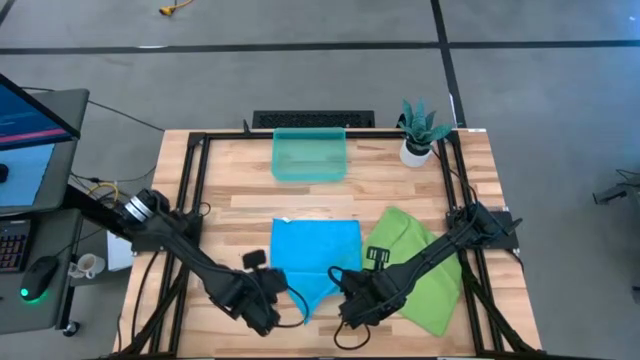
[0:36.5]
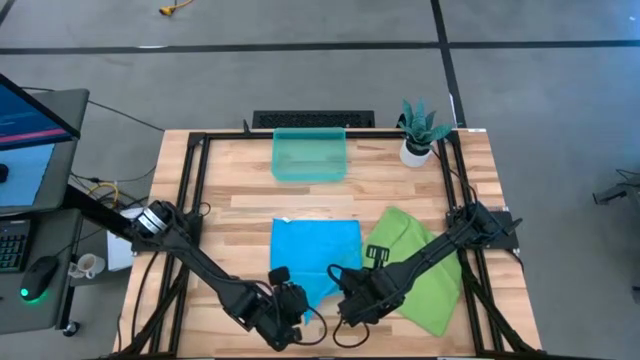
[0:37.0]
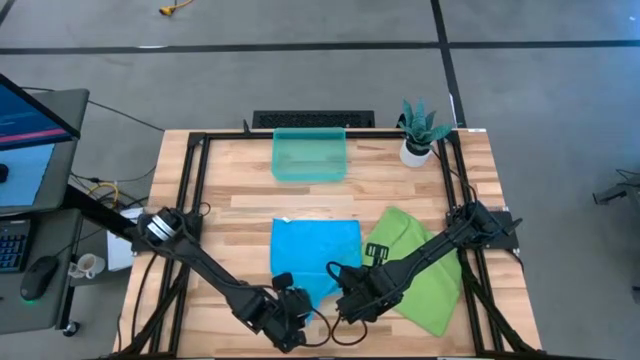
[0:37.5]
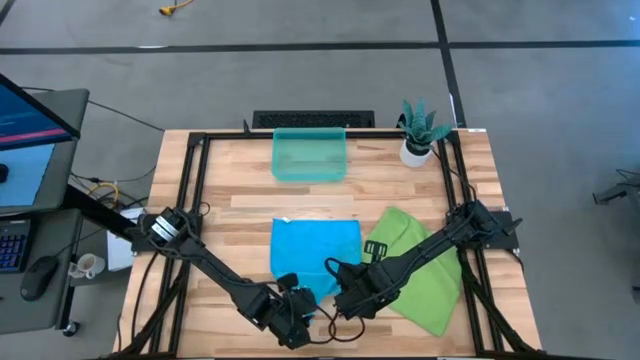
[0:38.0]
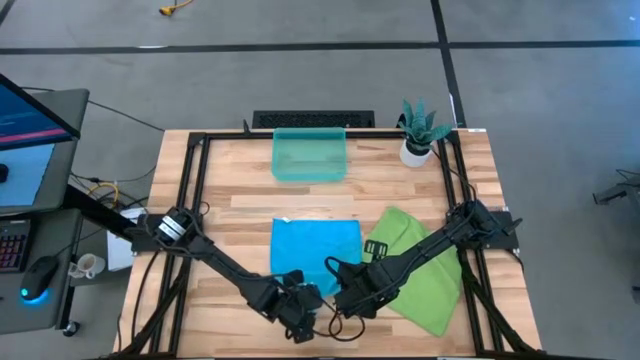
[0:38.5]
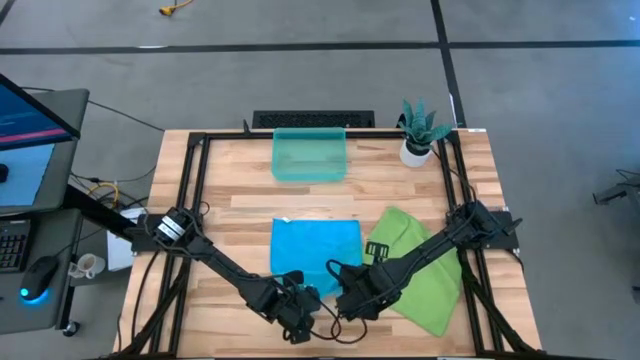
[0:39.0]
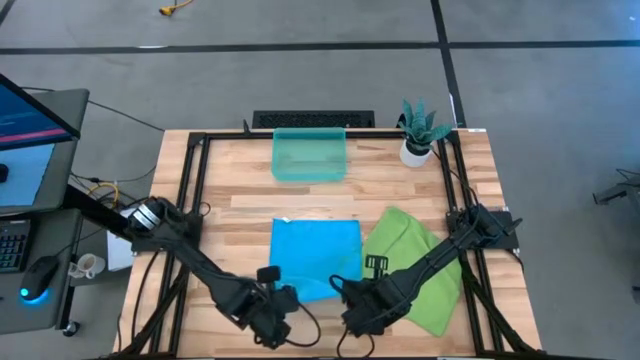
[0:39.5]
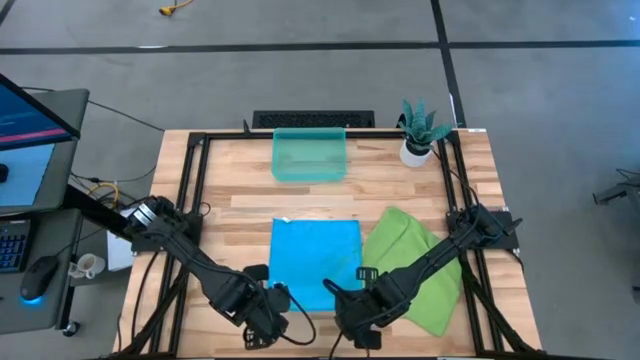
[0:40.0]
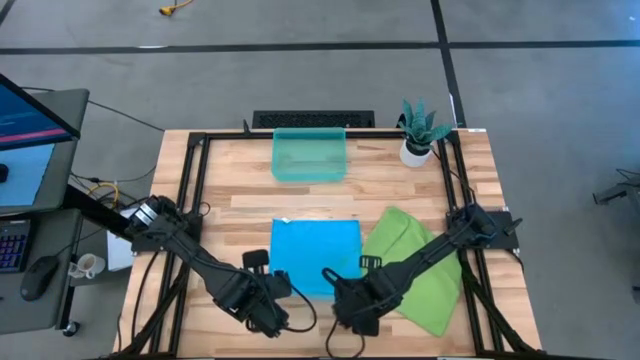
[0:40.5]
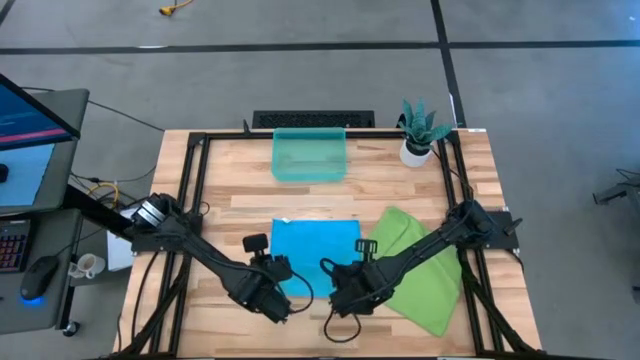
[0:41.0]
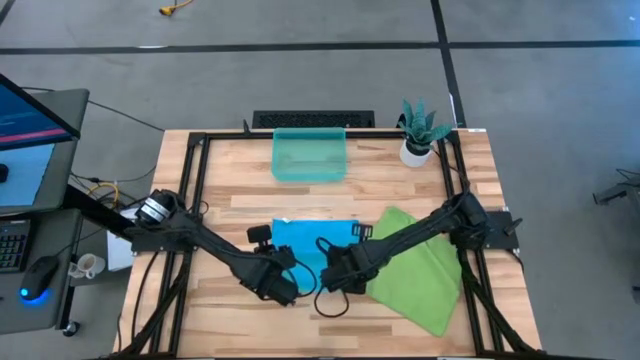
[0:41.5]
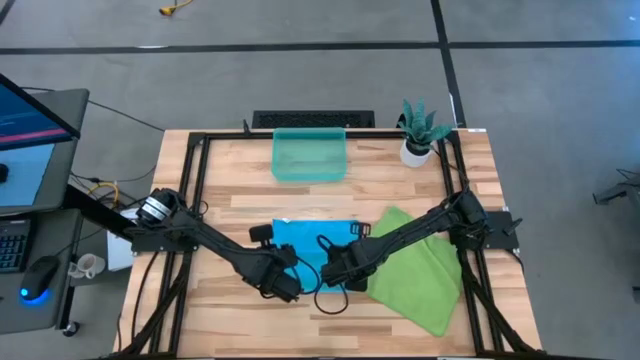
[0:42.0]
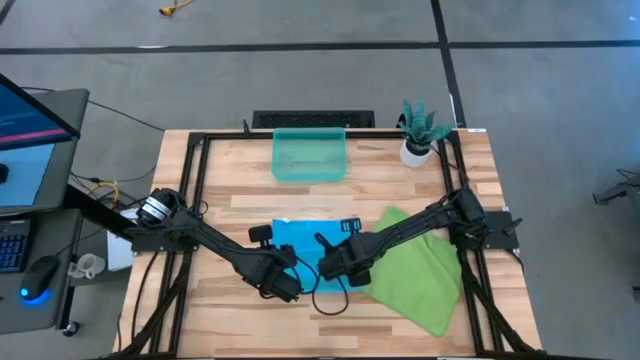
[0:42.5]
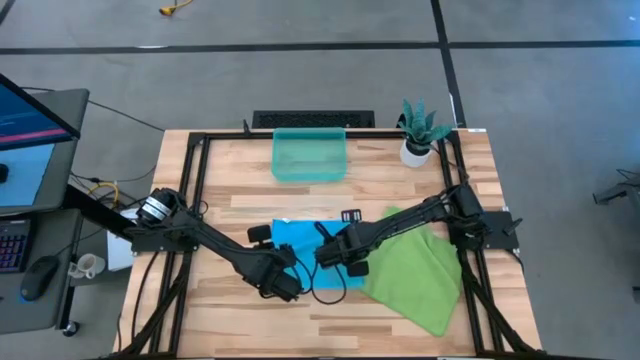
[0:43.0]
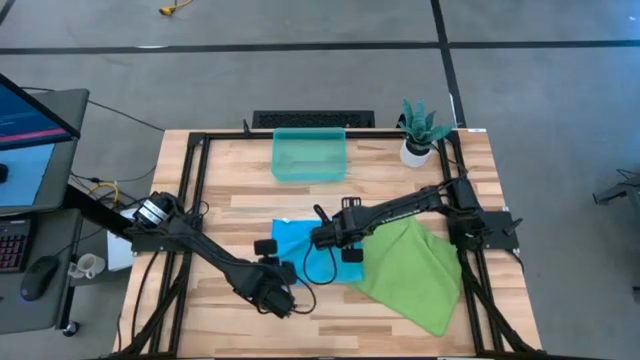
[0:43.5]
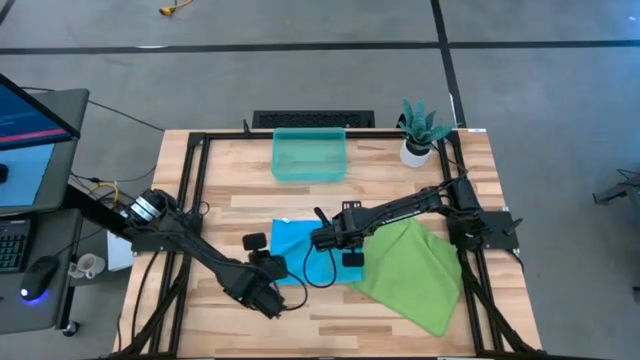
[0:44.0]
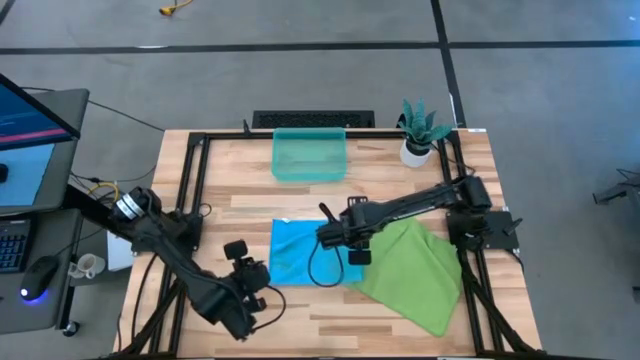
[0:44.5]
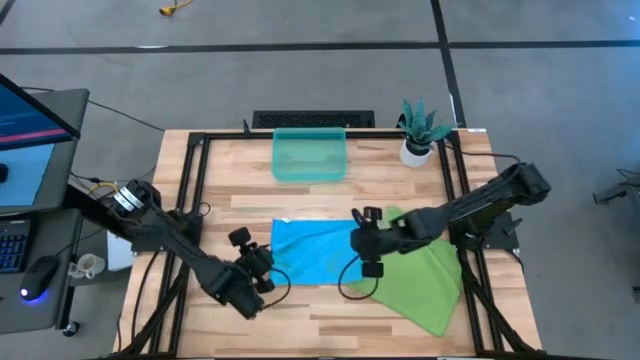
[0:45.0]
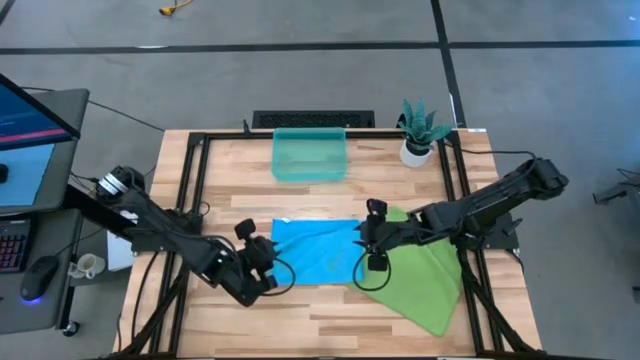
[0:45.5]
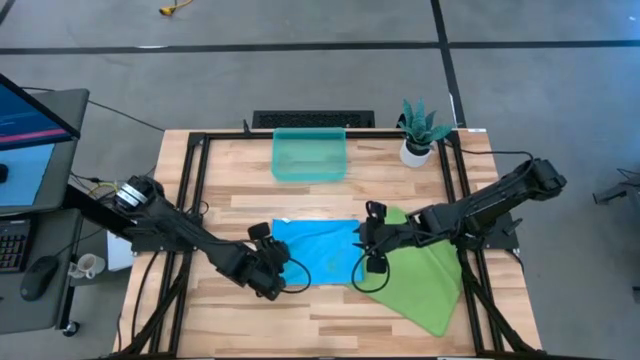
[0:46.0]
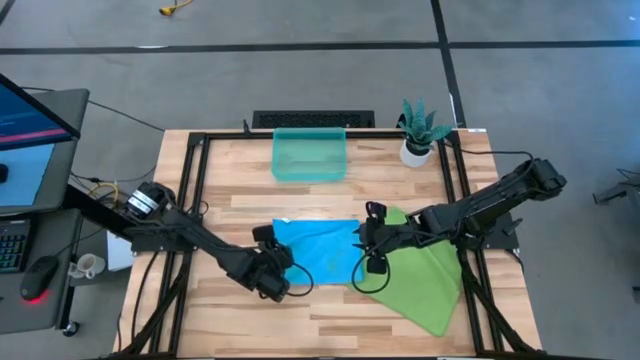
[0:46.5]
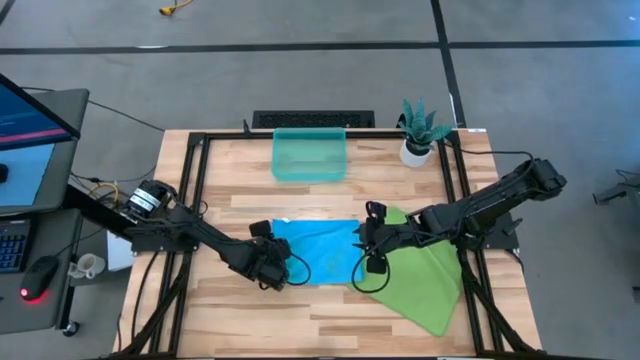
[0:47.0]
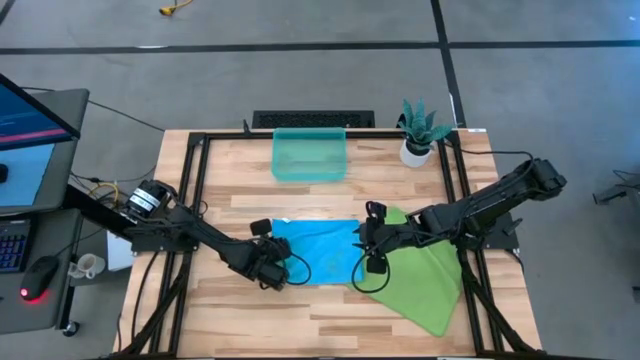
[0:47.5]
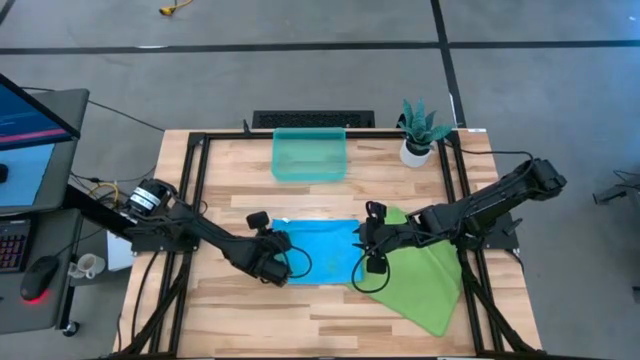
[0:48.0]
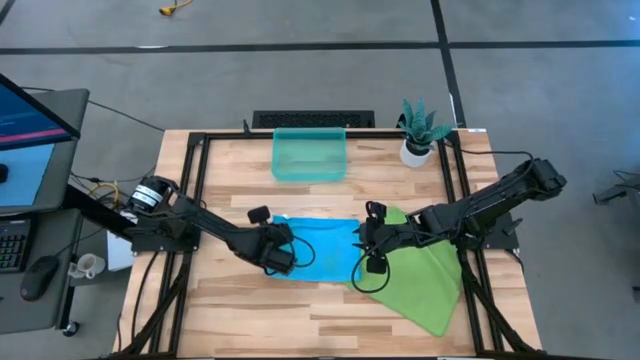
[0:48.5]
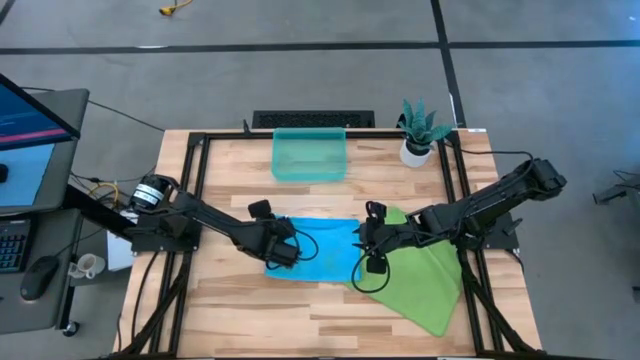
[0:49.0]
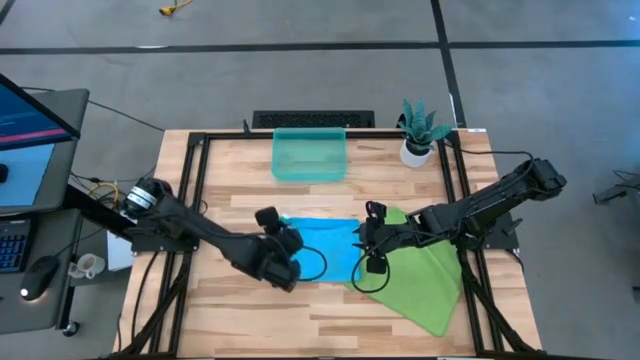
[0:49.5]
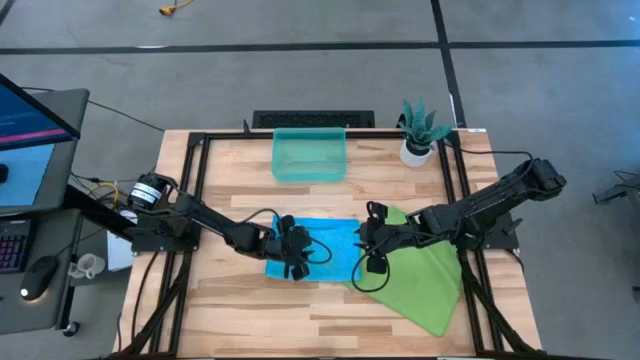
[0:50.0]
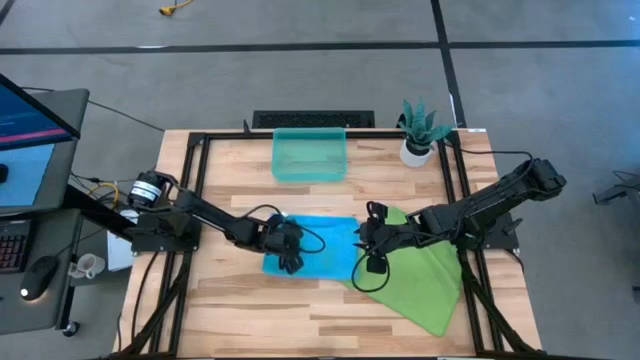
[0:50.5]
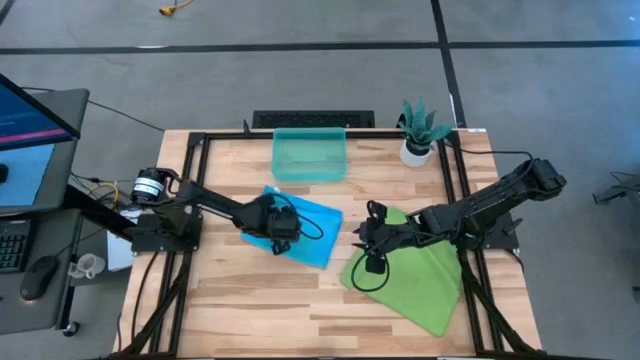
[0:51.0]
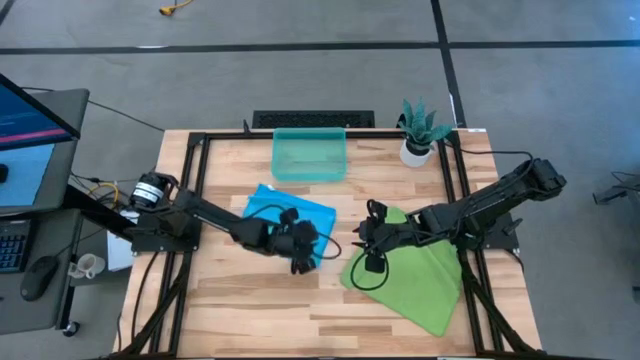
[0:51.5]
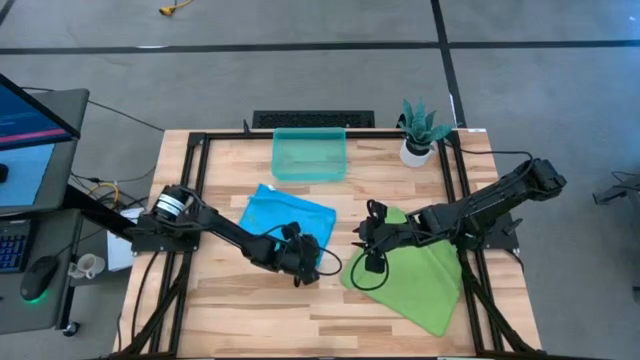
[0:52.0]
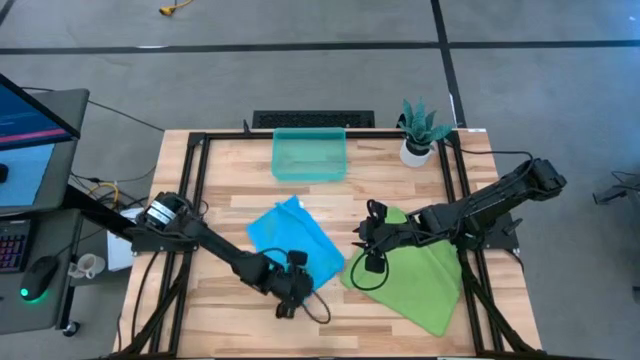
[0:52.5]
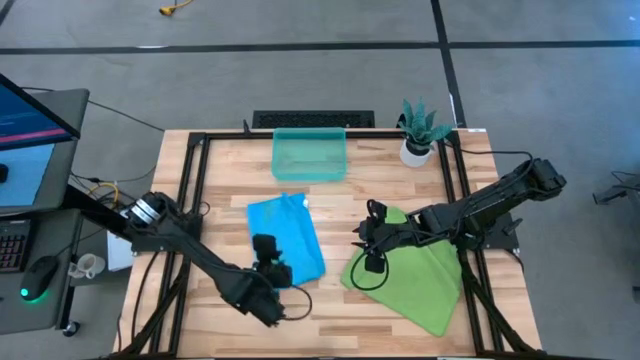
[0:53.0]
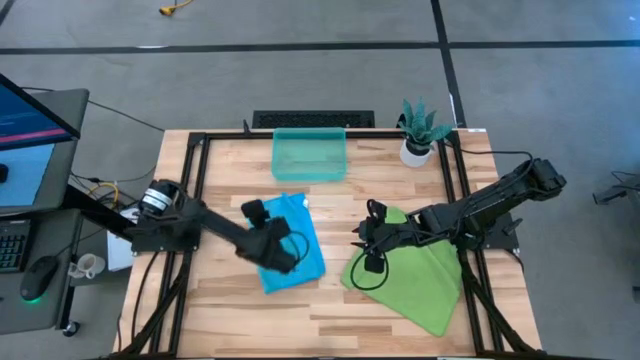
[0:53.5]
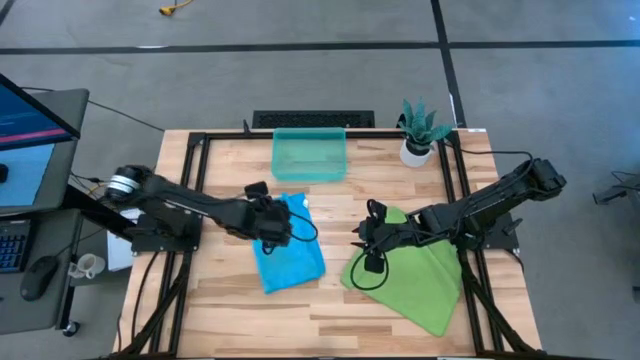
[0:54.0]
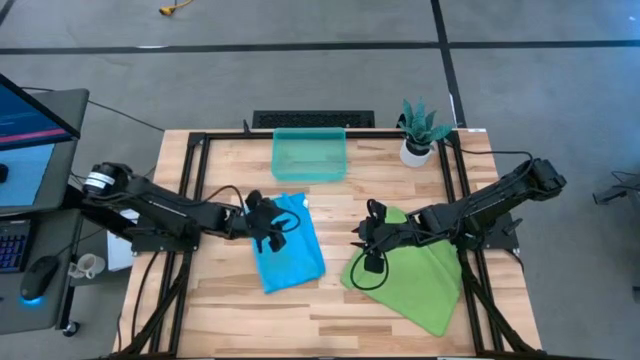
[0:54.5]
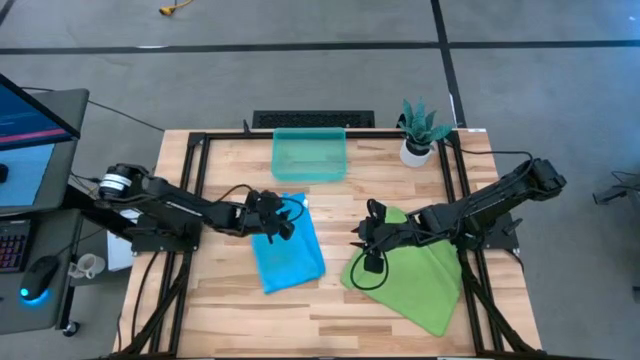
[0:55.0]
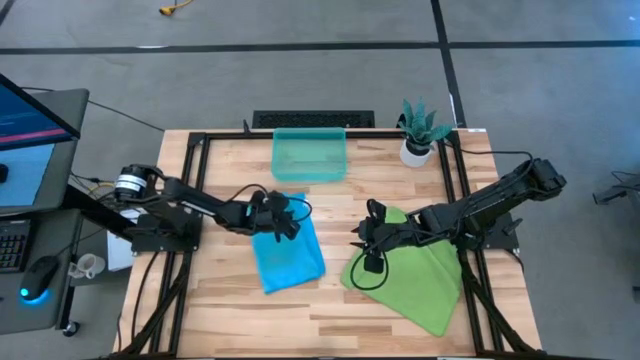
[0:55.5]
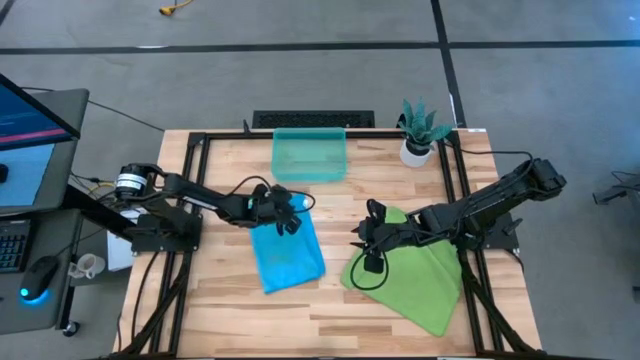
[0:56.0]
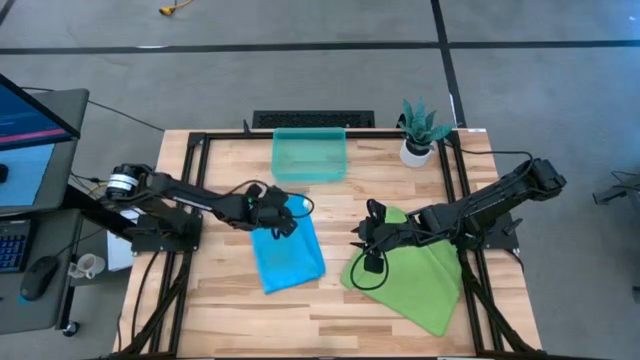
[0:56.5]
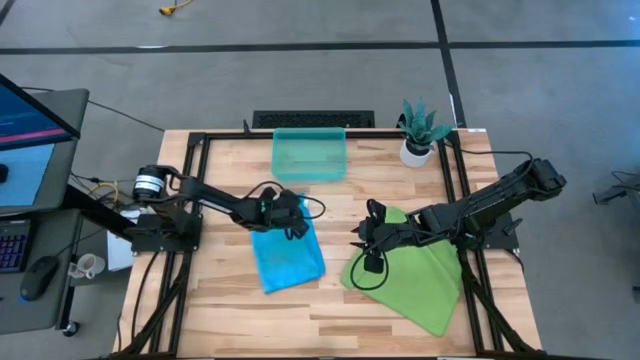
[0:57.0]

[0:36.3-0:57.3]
Task: Roll microfiber towels into tight, uniform cylinder then place into a basket
Fold the blue microfiber cloth
